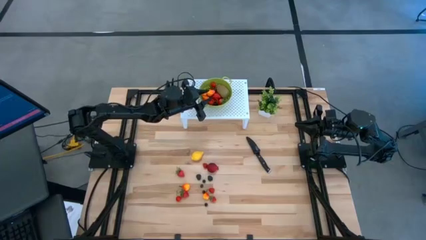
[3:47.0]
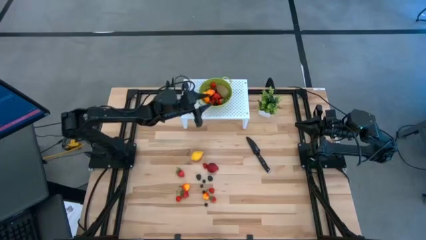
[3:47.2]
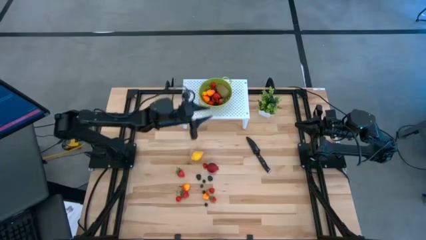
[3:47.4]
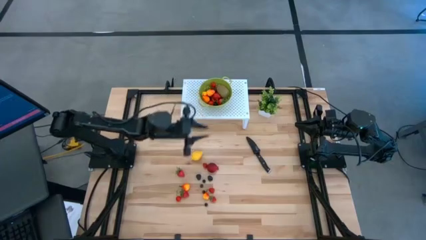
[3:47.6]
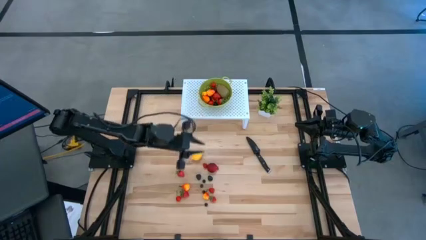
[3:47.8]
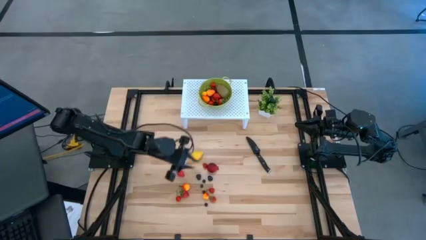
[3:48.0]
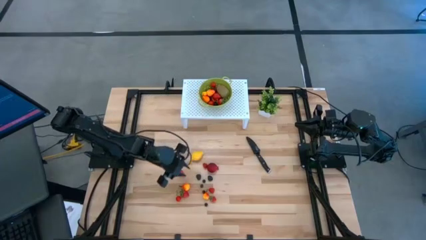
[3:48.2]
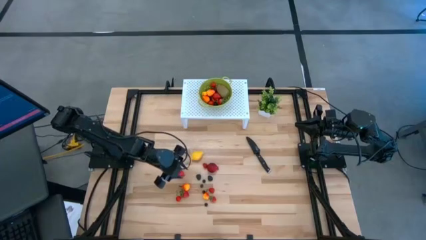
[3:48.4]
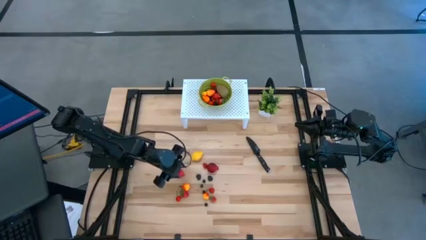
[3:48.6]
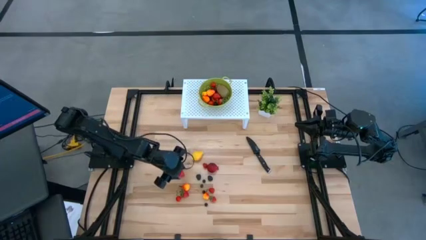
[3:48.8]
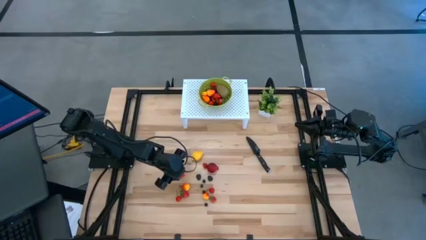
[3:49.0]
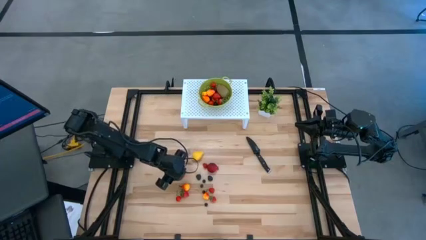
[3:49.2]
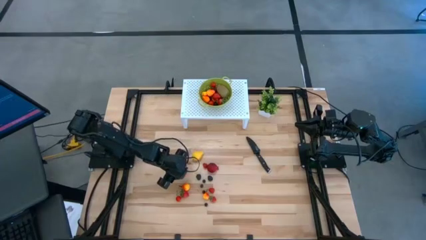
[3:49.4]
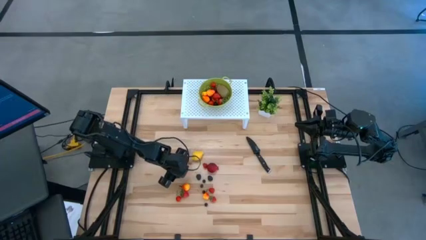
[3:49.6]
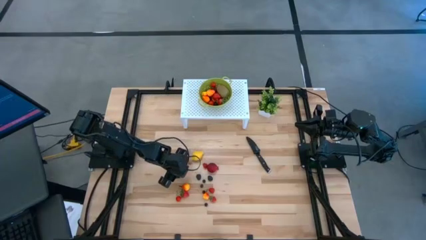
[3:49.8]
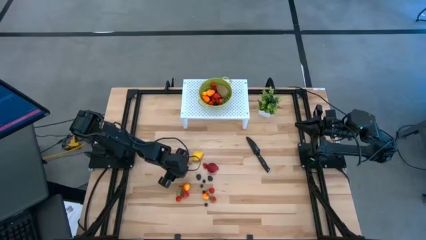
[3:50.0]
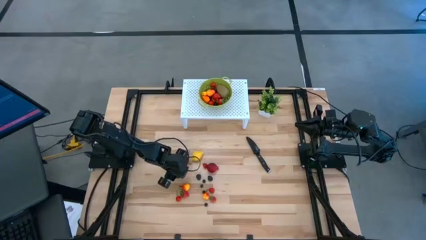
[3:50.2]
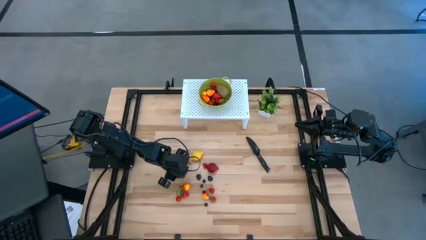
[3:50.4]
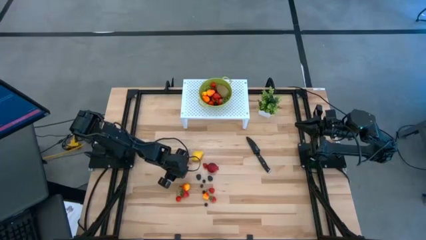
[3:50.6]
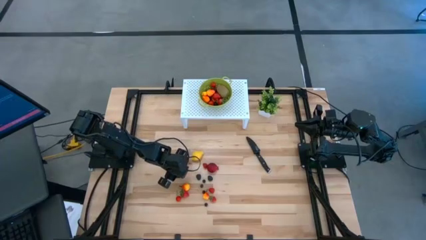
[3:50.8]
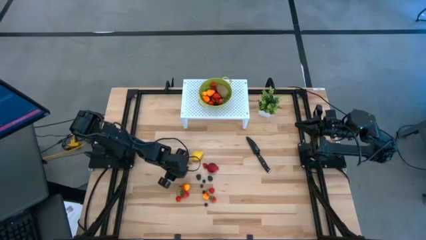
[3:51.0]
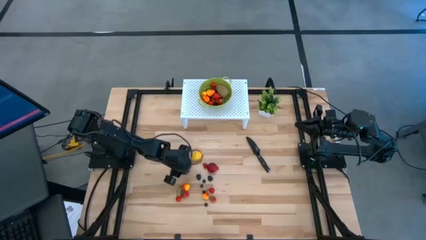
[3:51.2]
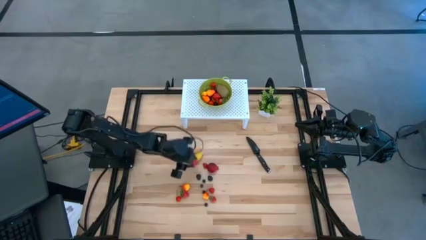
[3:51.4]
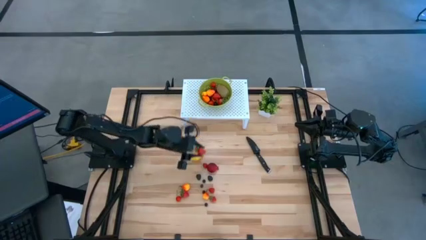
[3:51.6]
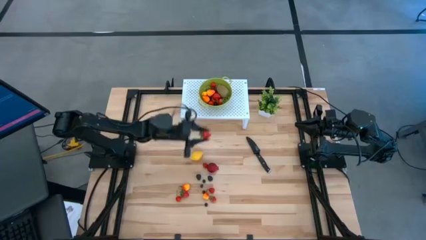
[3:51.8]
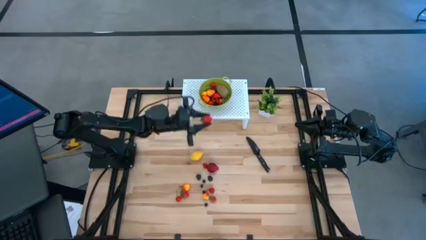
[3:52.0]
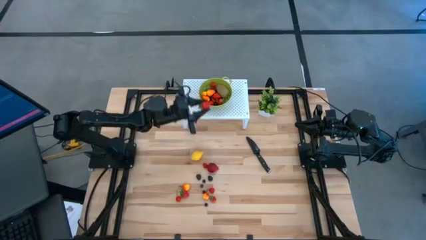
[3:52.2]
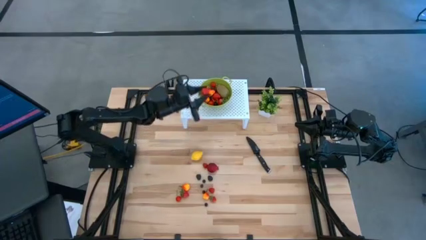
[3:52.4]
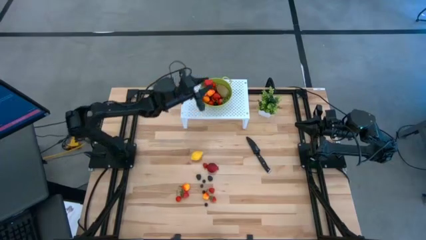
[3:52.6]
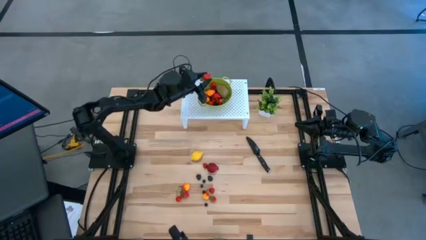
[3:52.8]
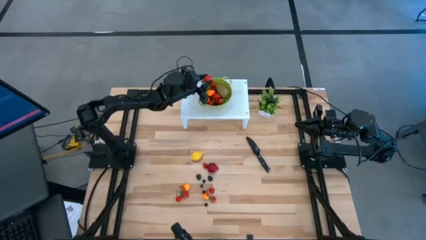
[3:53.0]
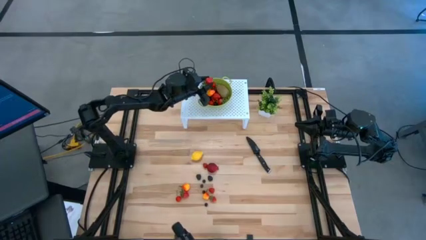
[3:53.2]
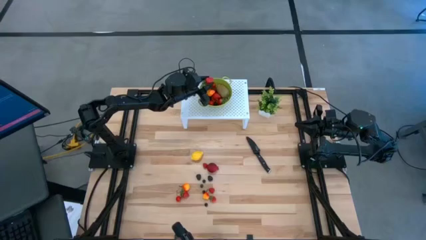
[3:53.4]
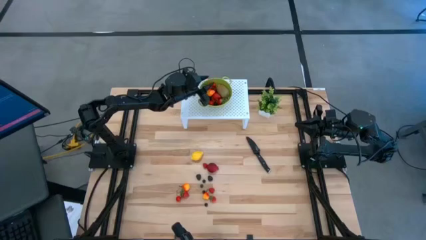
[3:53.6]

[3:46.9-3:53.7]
Task: Pick & Place Fruit
Put the red strawberry into the green strainer bowl

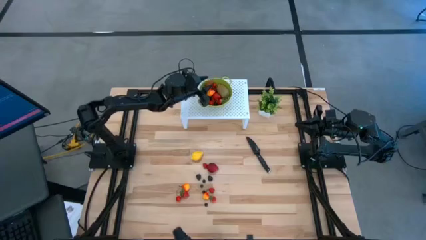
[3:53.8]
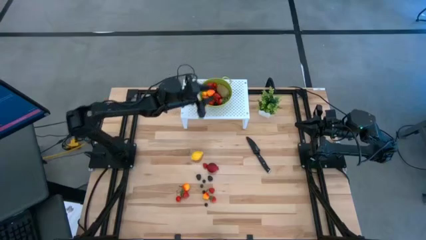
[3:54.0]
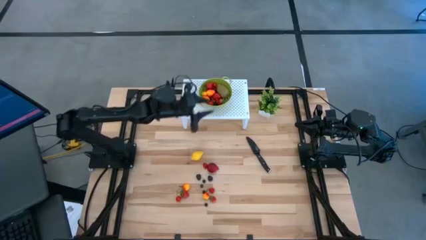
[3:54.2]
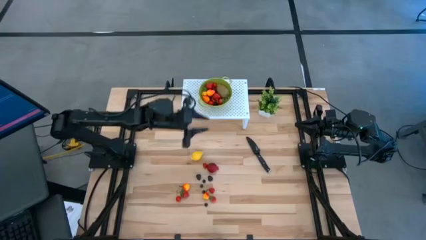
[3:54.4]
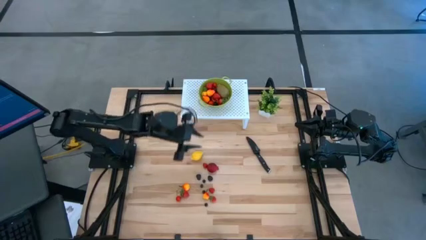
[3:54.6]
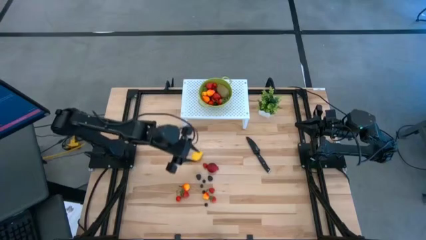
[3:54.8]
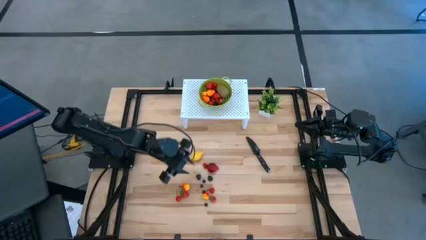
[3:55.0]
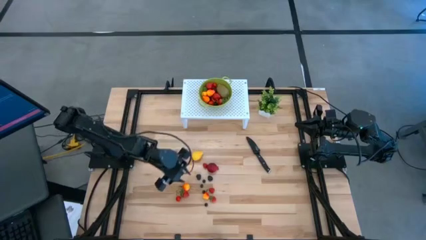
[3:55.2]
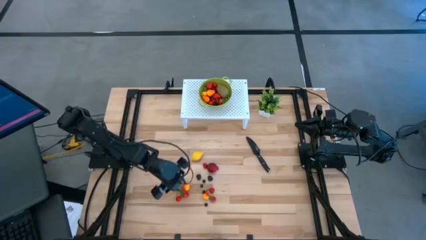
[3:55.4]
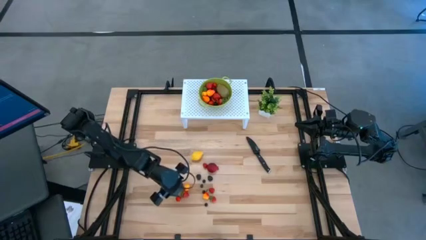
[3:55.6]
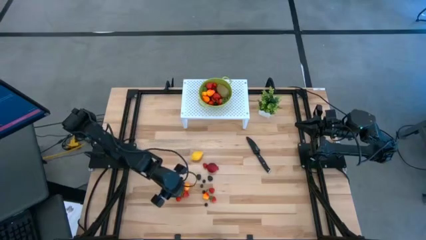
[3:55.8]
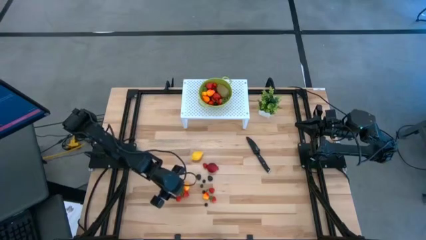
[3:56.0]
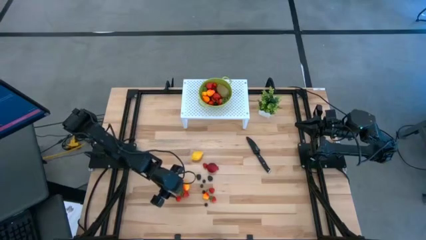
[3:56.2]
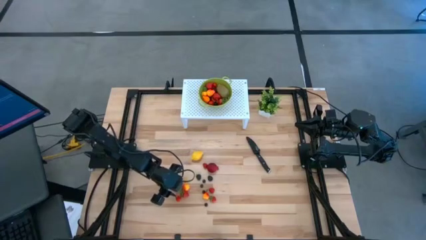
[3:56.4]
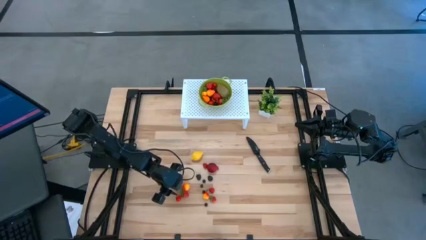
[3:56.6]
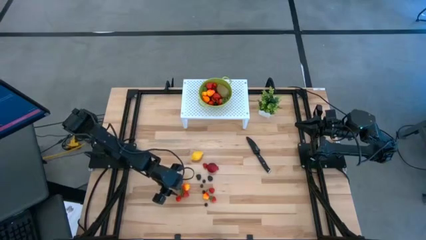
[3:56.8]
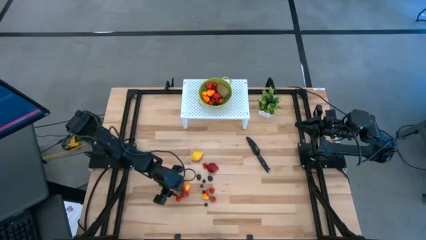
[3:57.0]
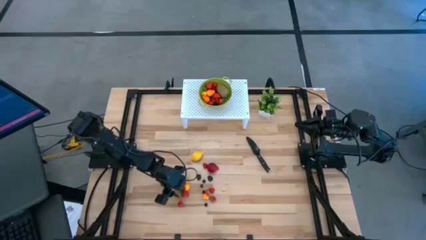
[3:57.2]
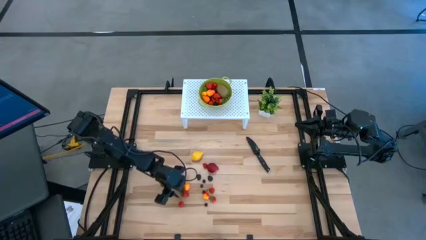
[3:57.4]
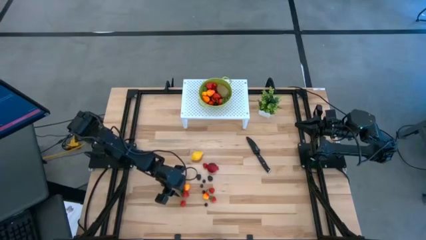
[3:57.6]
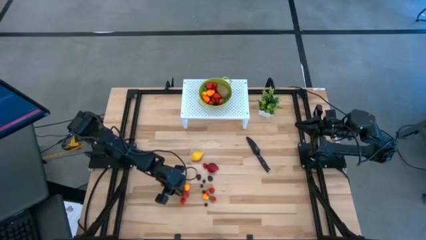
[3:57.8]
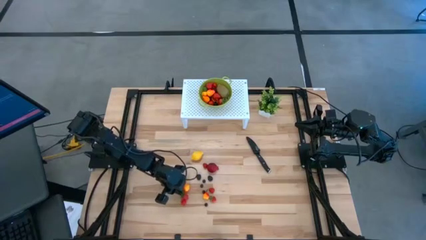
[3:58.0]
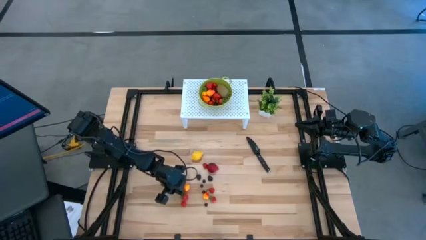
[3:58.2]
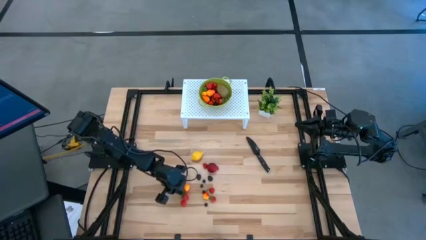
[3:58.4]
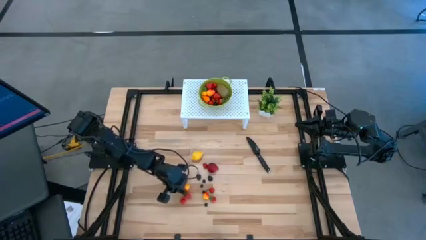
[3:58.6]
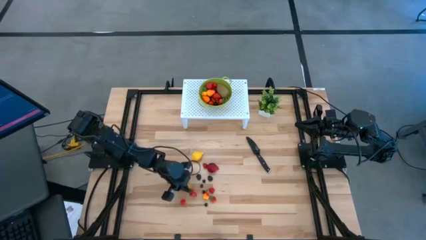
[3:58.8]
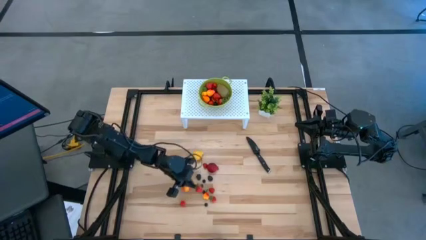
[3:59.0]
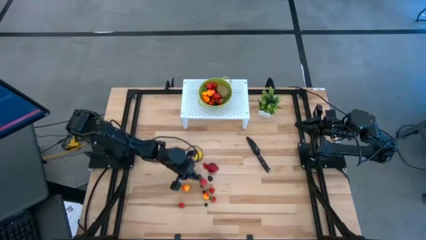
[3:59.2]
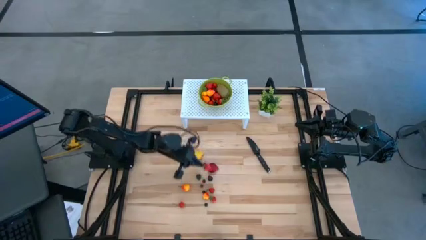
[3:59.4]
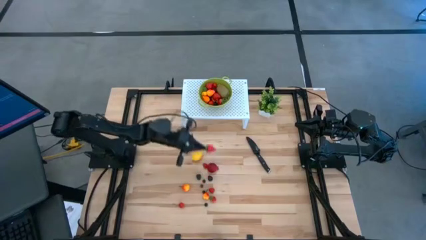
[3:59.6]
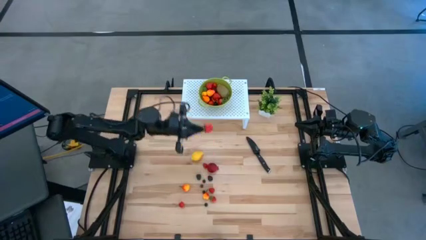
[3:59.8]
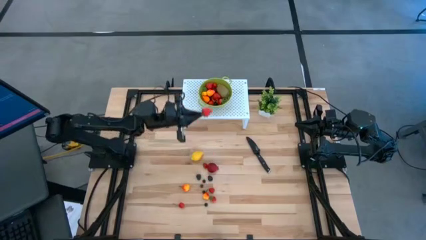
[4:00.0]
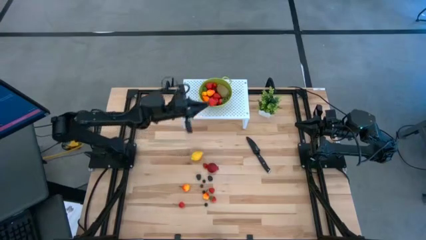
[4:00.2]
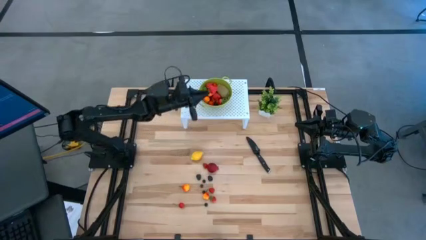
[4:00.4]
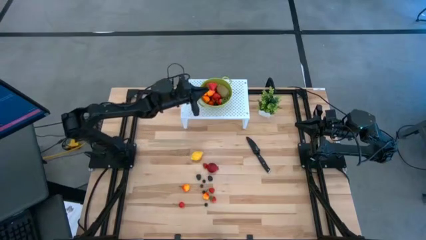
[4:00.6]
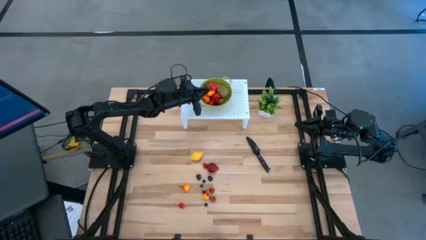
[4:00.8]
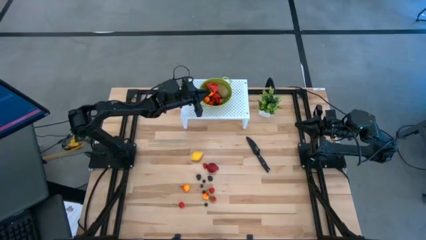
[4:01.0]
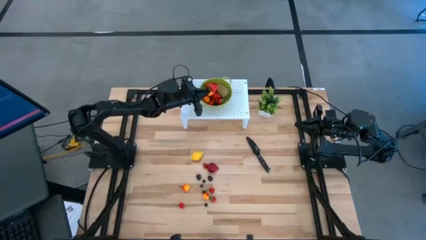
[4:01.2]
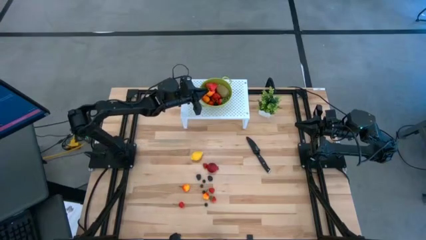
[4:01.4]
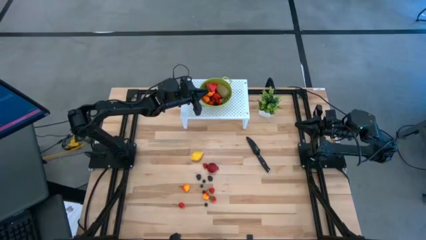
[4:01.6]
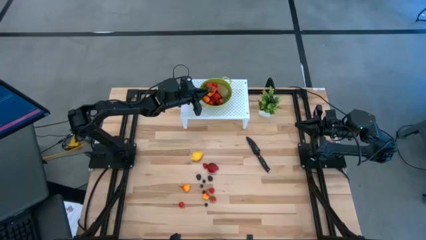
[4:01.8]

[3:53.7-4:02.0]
Put the red strawberry into the green strainer bowl

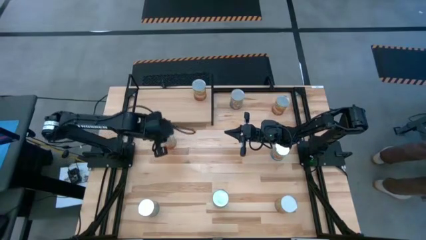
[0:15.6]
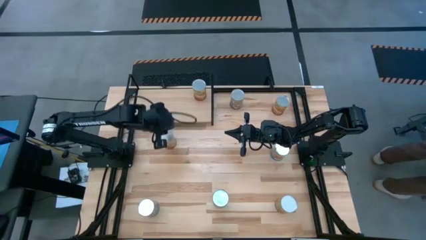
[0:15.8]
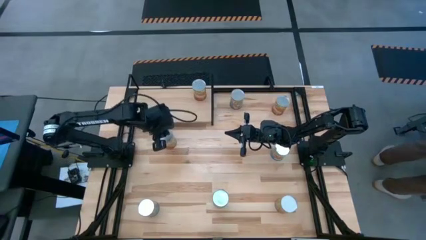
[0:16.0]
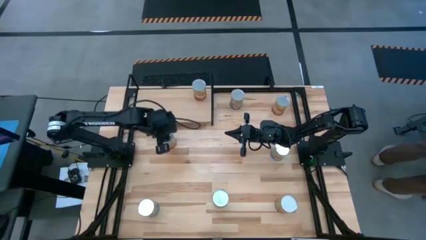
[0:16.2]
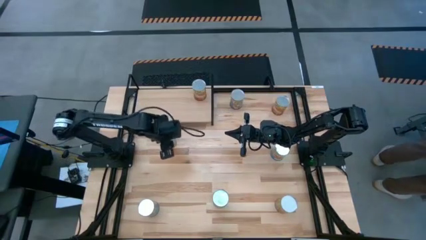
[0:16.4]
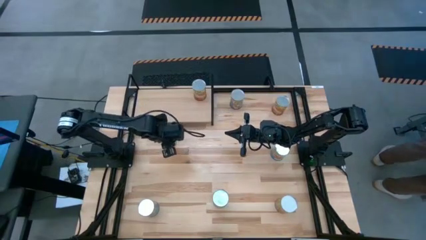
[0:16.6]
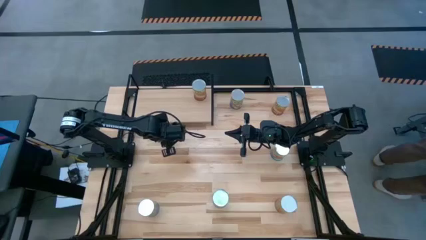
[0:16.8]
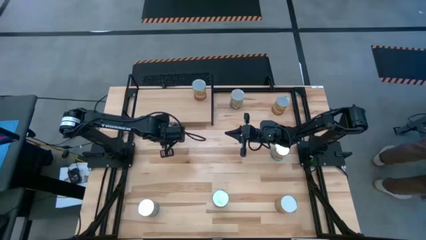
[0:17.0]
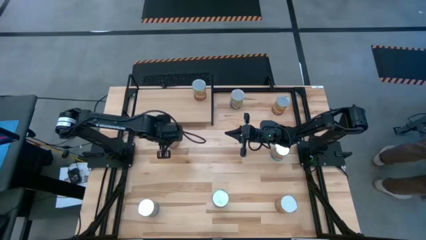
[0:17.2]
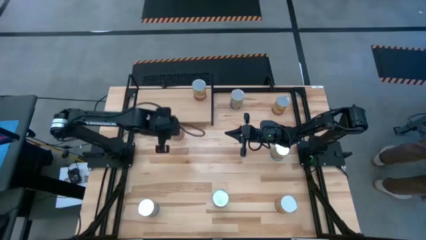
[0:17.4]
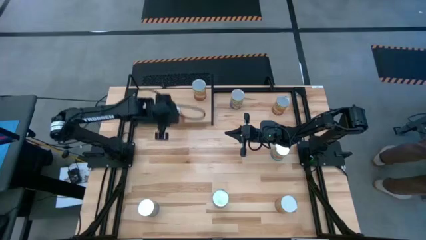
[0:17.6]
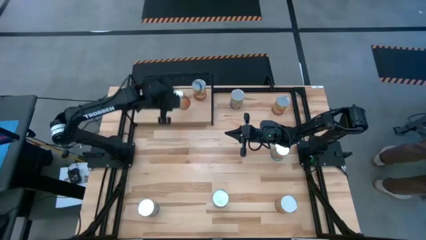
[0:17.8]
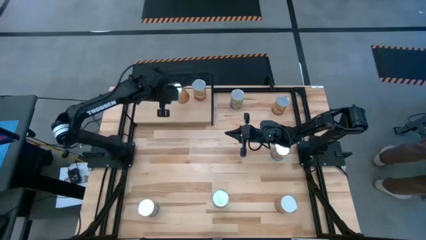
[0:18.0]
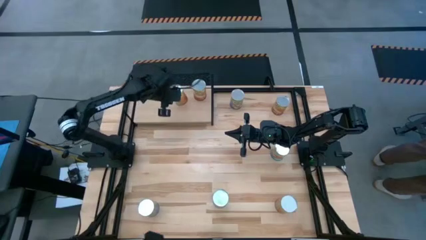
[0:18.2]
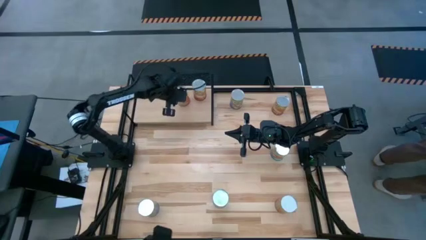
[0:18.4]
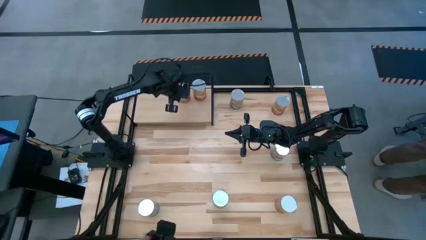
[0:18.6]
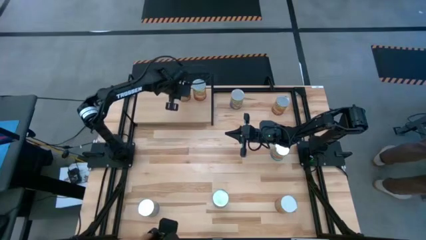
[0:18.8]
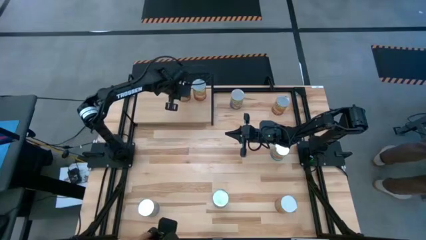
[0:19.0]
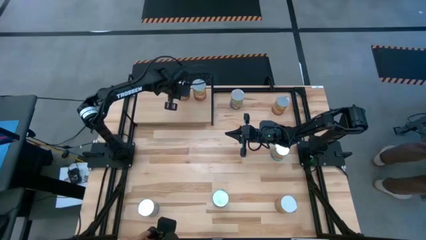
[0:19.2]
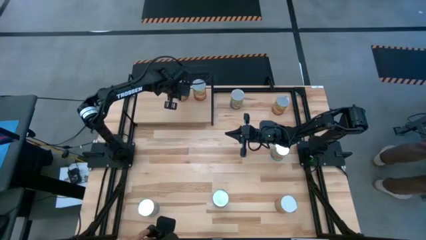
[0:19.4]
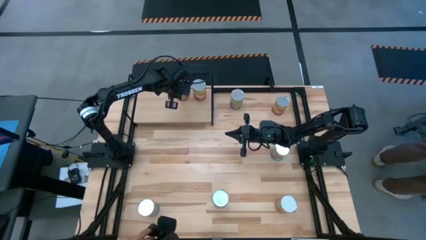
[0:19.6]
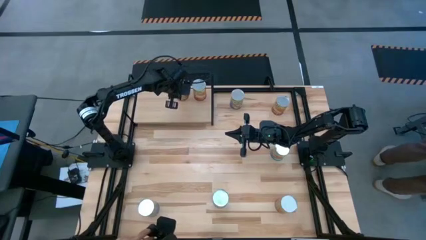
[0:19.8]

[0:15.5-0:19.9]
Task: Pick and place cans onto a shelf
Put the left canned green beans on the shelf
